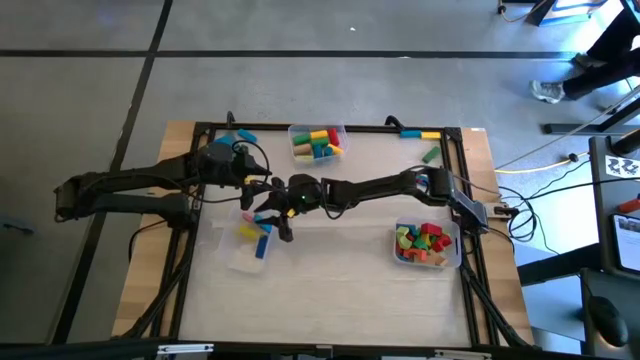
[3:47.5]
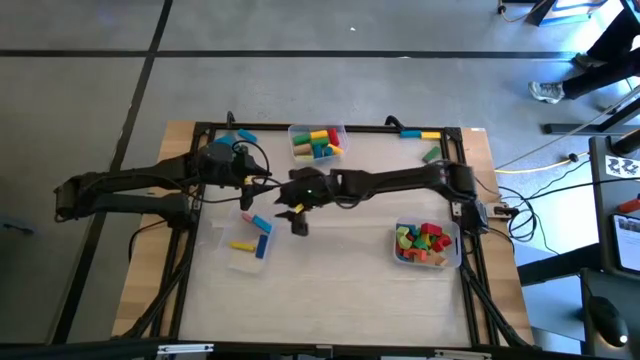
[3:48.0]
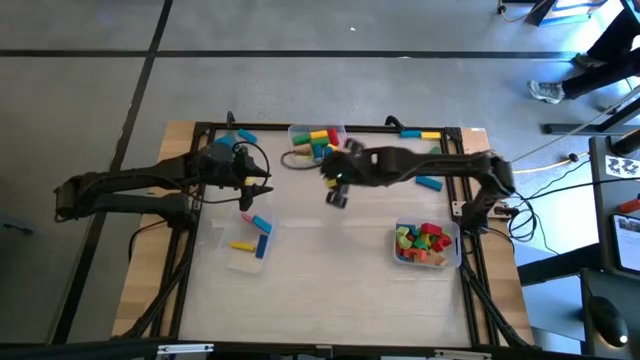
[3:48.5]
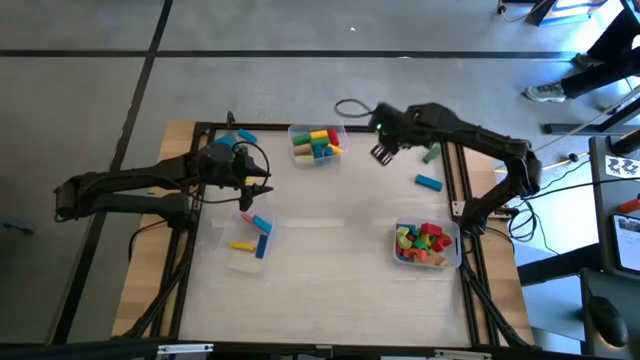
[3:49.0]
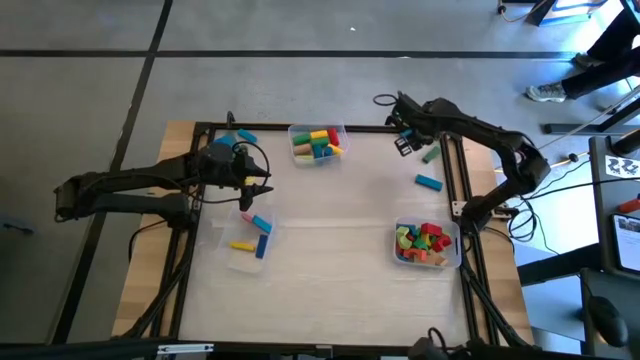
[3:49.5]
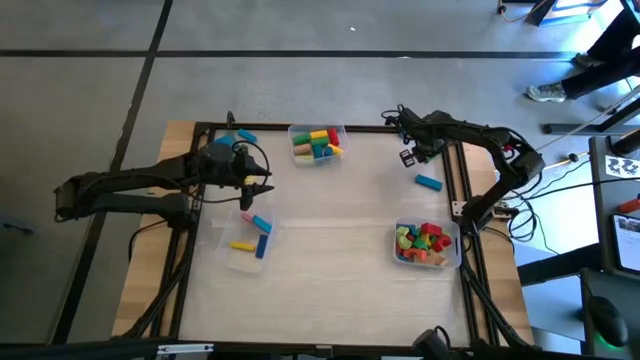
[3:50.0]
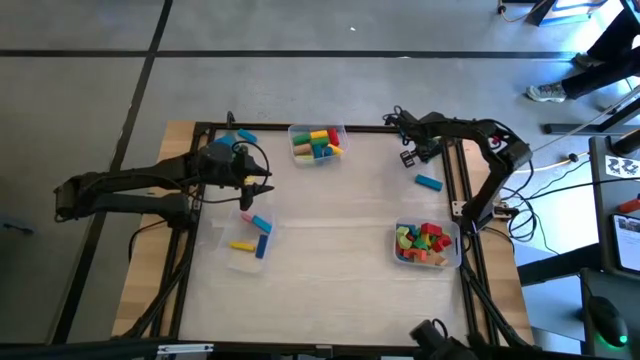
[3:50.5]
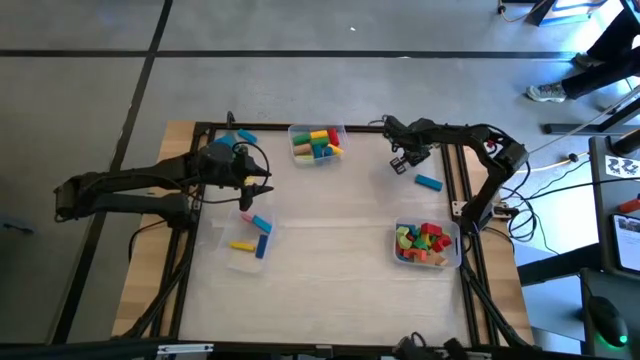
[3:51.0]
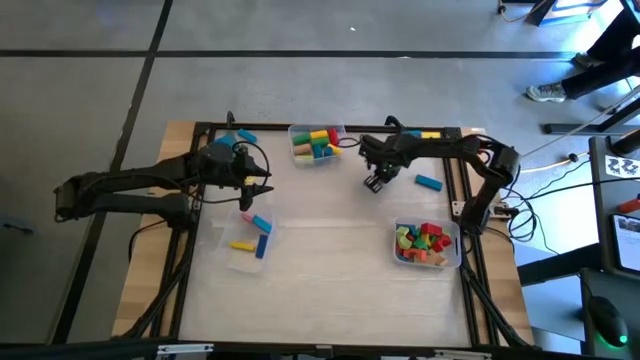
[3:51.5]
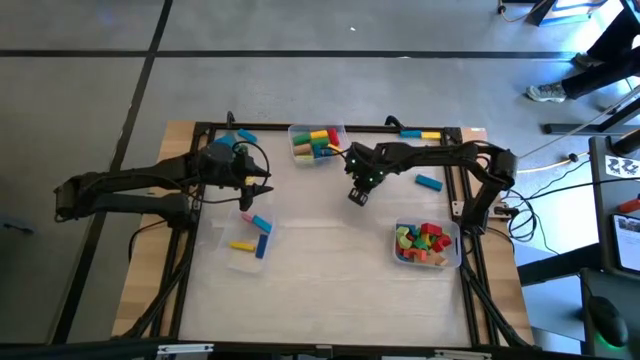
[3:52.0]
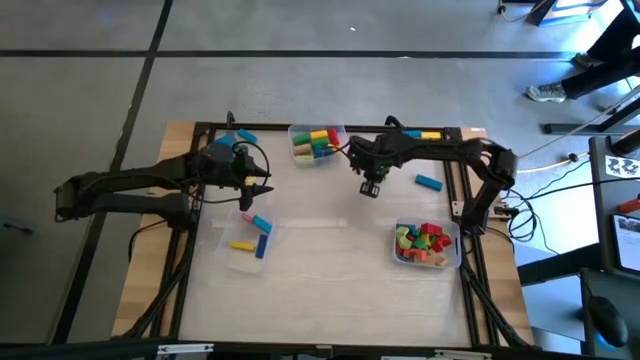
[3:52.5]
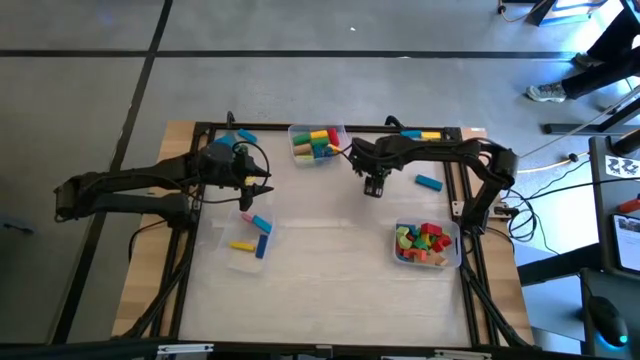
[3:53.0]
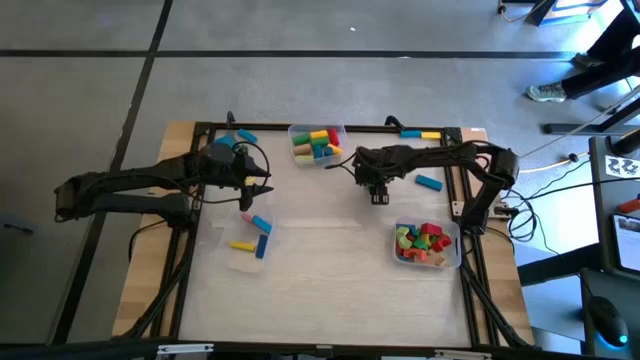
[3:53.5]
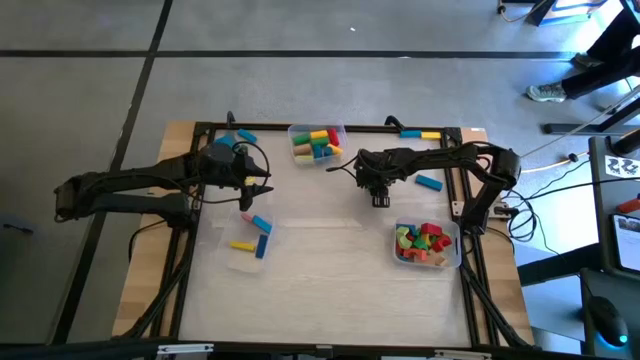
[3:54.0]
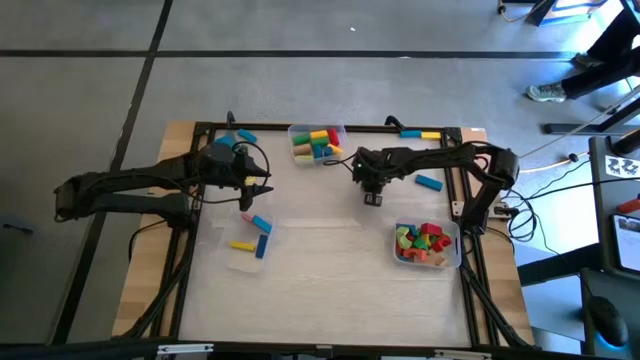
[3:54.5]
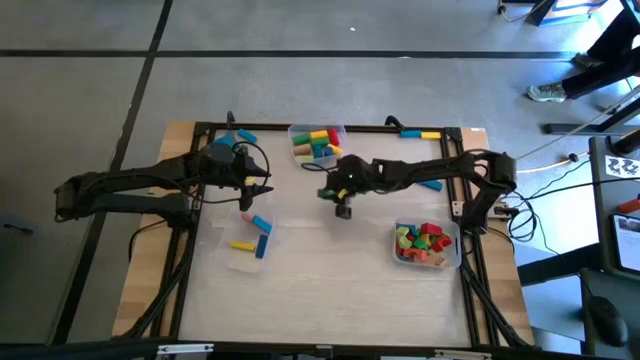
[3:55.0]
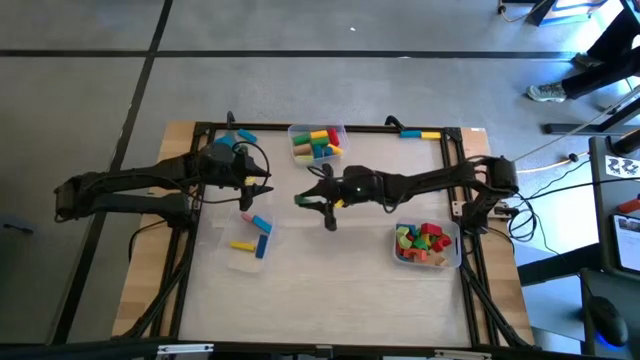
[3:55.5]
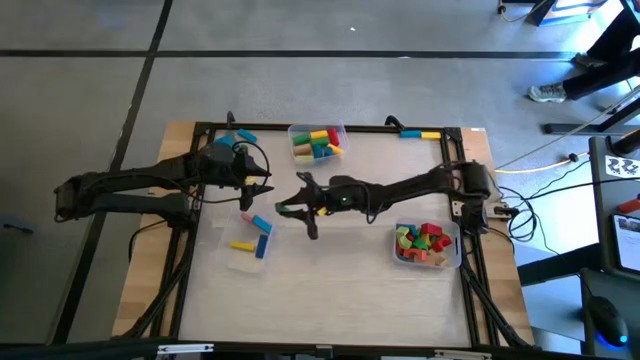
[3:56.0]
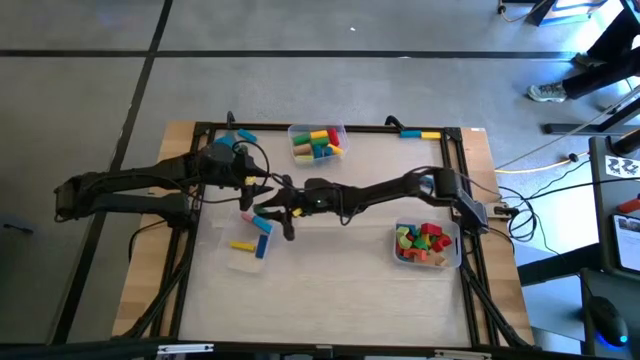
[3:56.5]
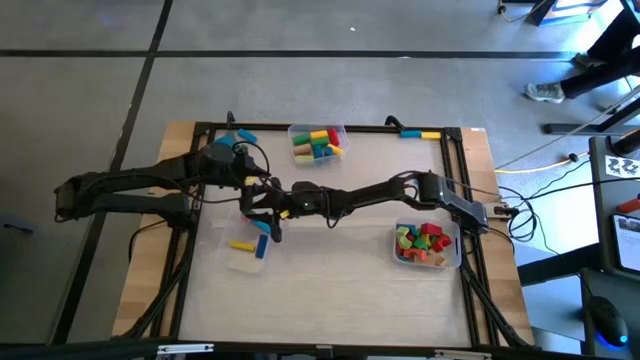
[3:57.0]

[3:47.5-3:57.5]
Task: Sort blocks by size
Put the green rectangular block into the bottom left transparent bin

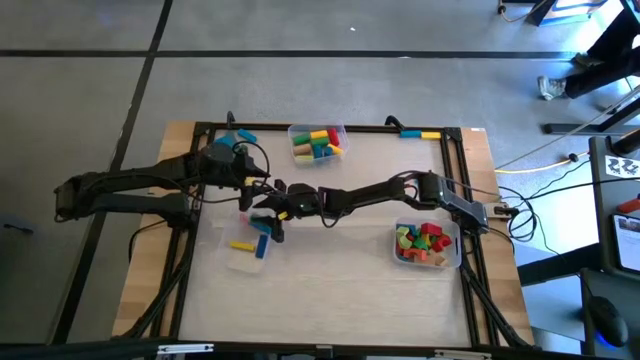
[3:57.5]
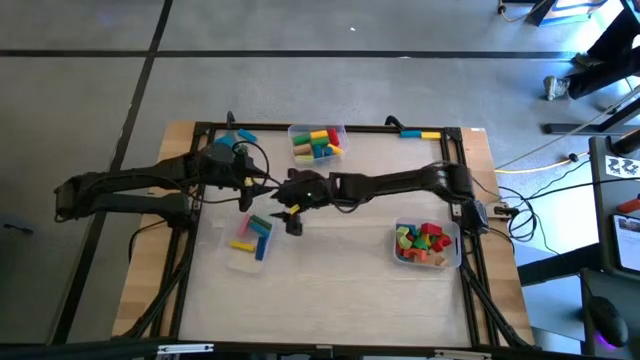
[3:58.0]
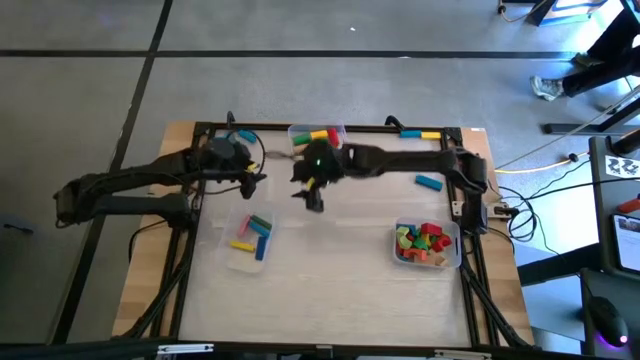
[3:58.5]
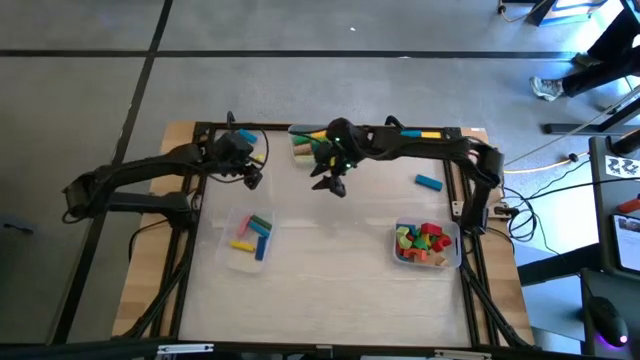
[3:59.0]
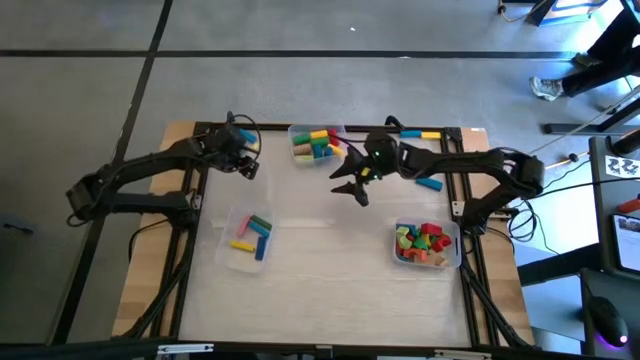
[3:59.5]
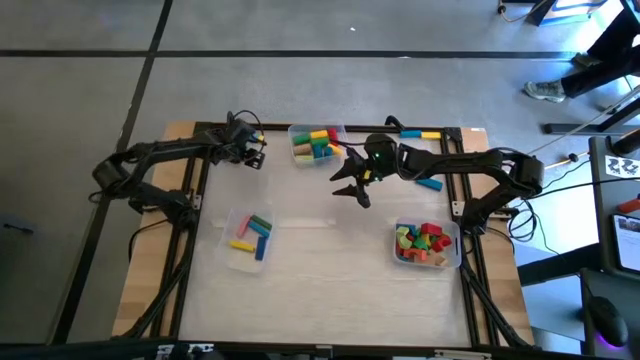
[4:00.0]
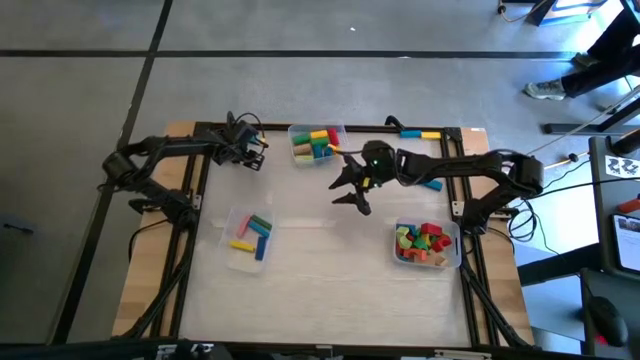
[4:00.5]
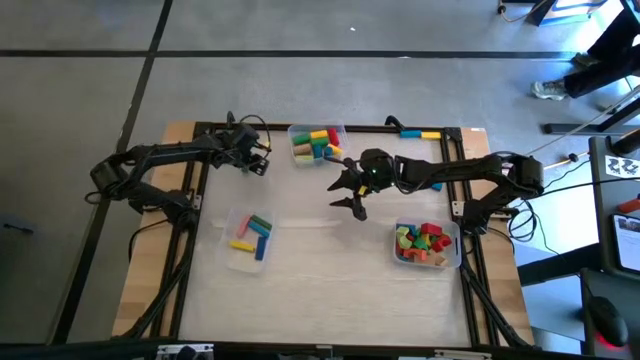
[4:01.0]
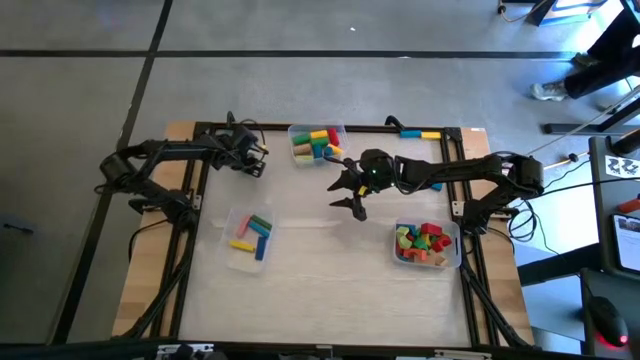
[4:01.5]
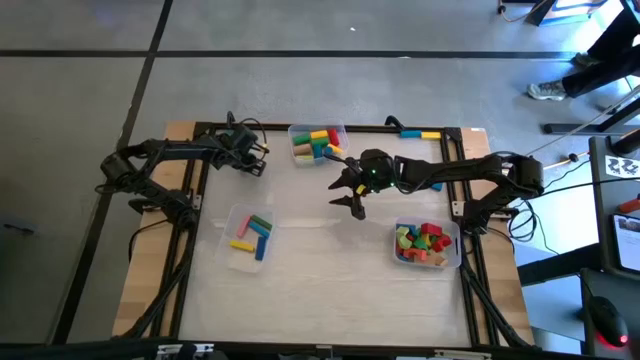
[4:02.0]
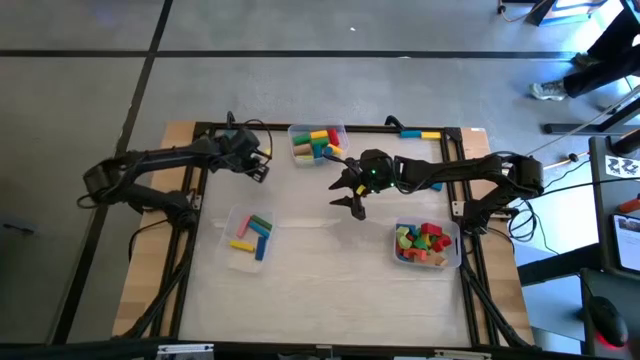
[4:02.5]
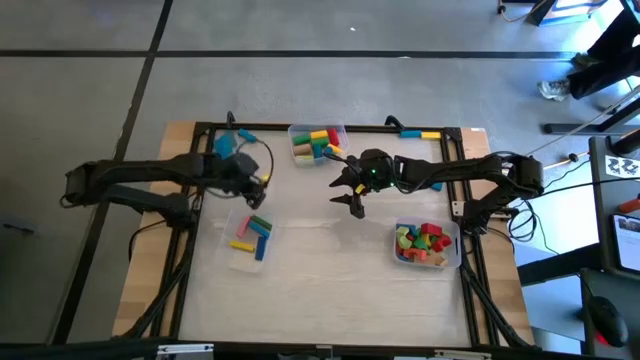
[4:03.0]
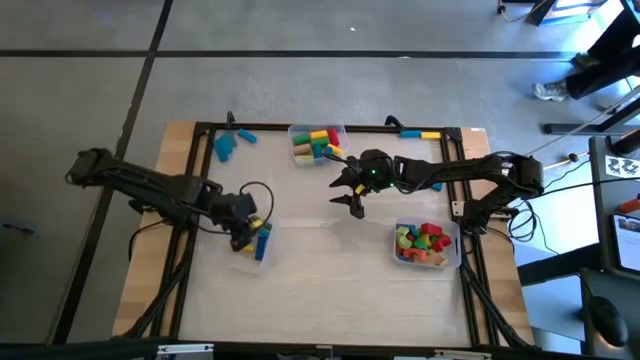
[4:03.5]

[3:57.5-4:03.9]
Put the green rectangular block into the bottom left transparent bin

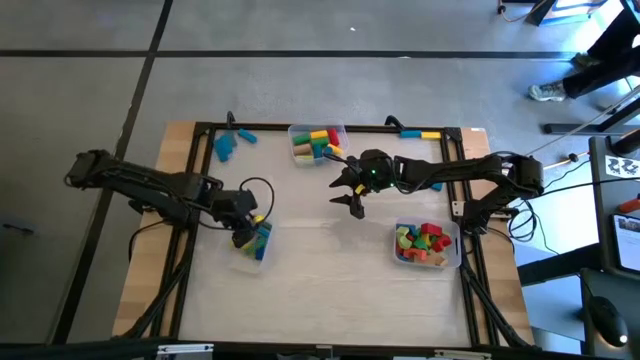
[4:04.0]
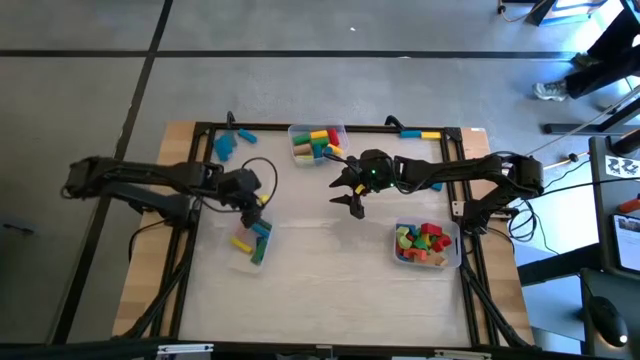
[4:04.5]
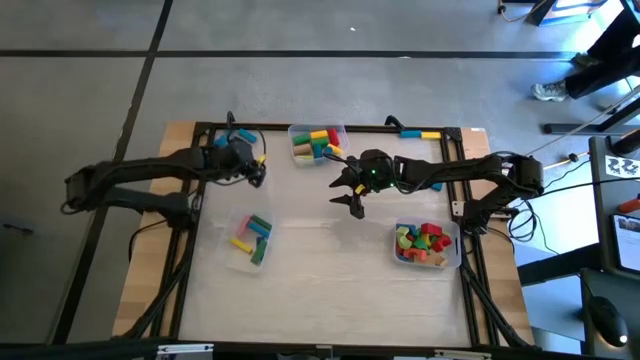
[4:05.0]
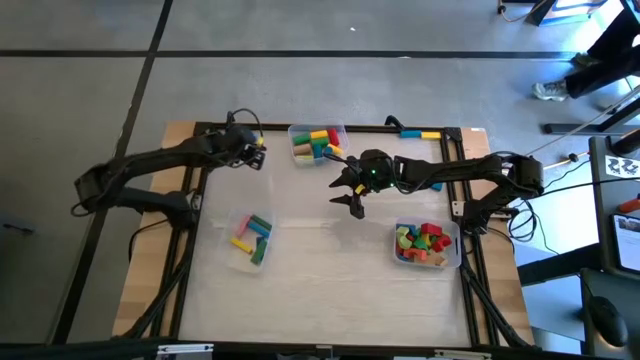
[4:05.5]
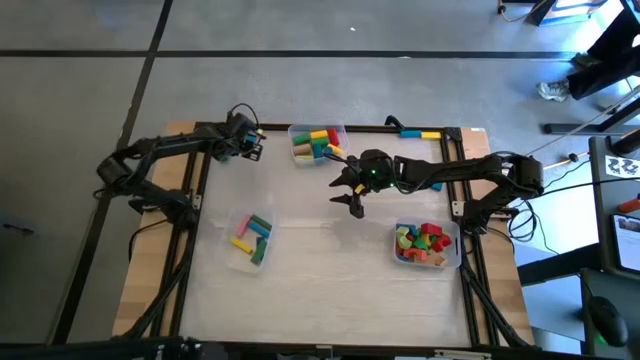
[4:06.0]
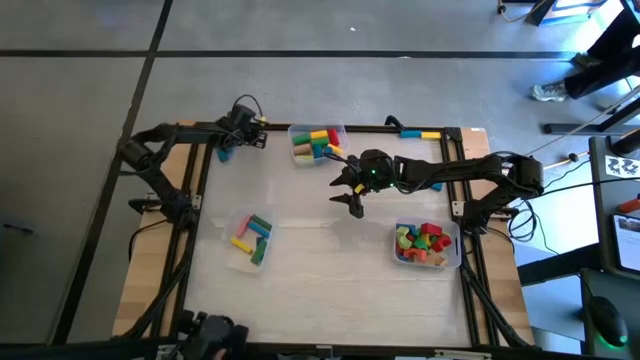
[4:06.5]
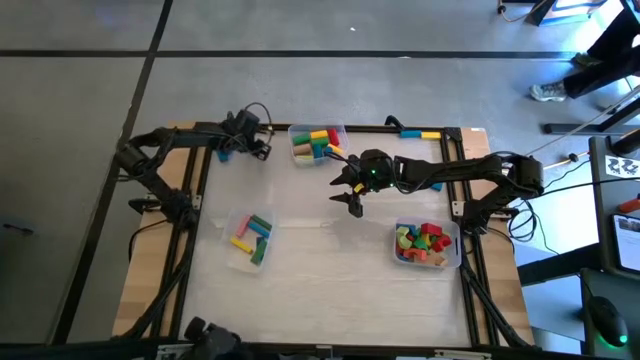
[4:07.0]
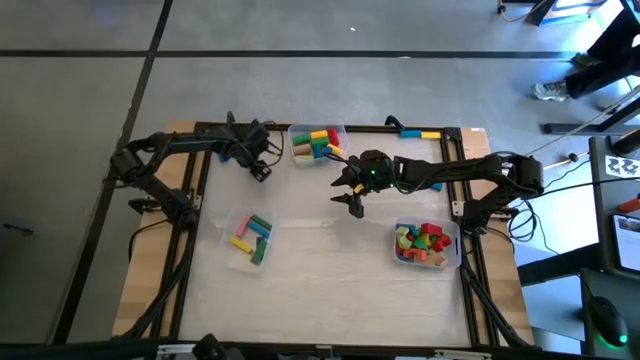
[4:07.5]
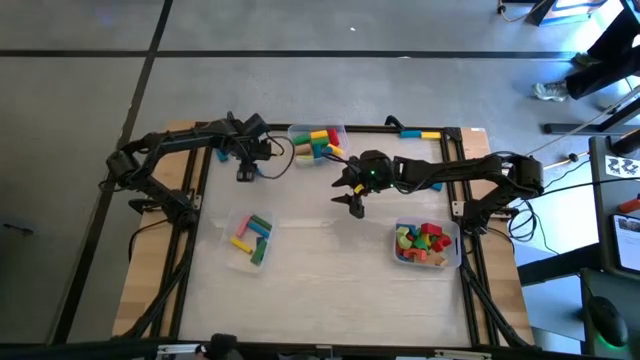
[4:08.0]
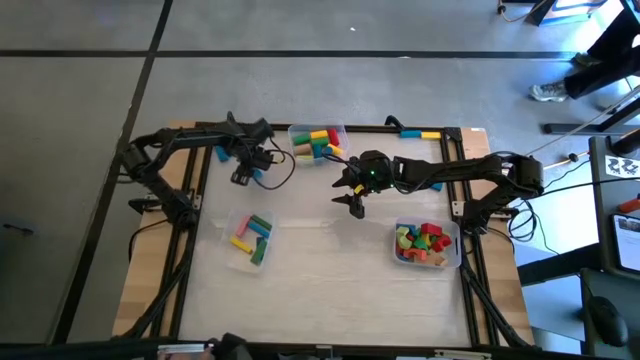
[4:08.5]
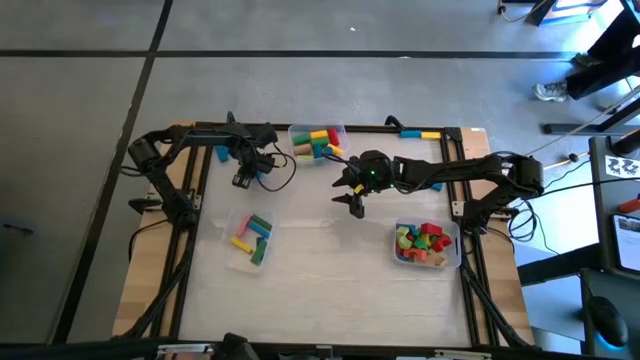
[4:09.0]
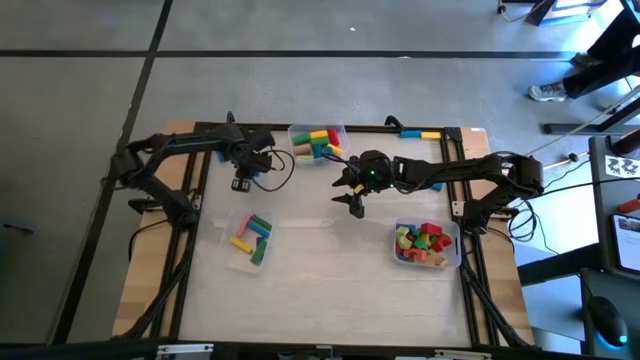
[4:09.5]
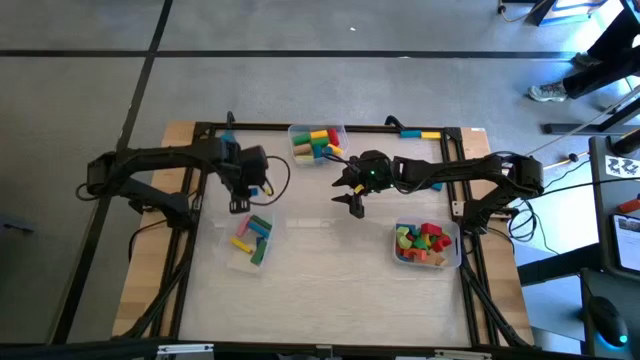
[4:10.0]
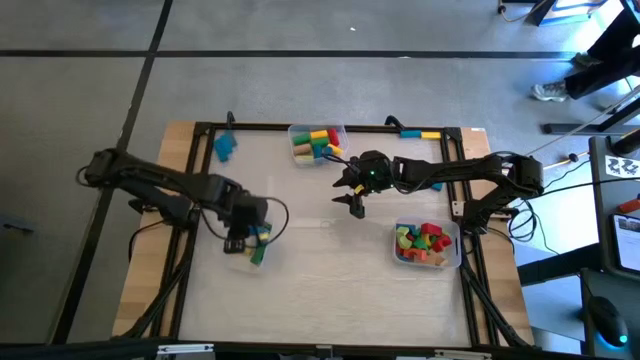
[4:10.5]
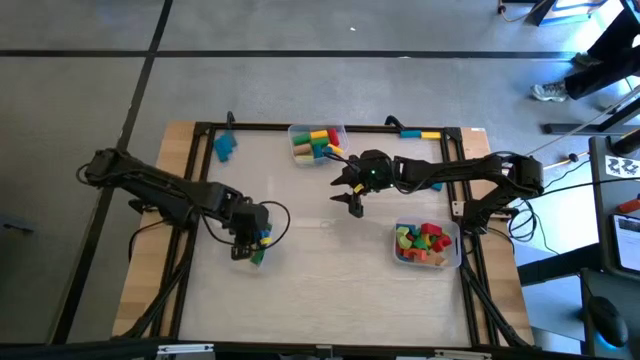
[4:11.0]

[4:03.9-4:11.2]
Put the blue rectangular block into the bottom left transparent bin
